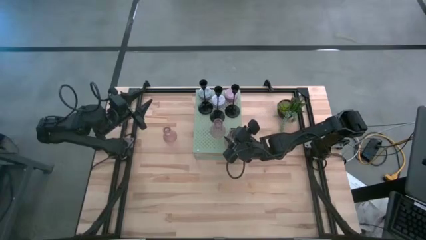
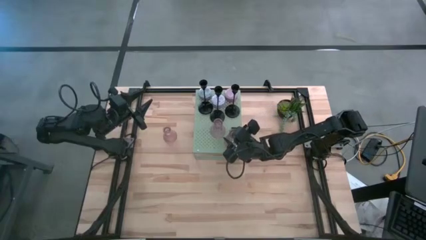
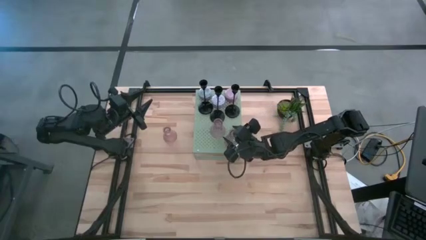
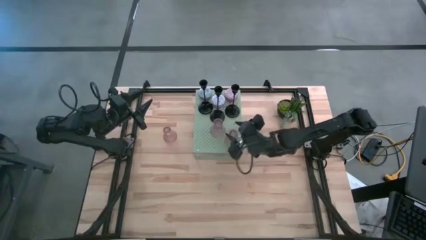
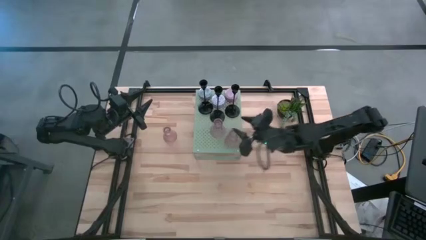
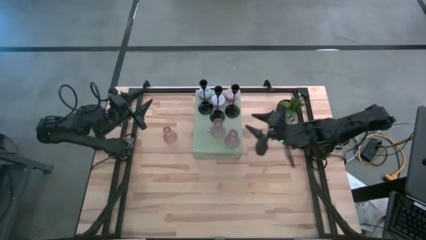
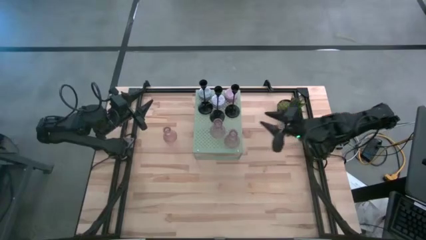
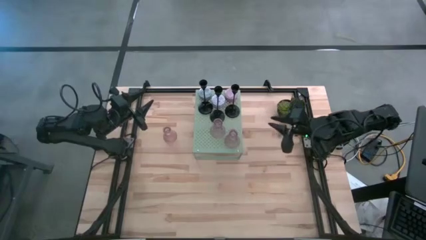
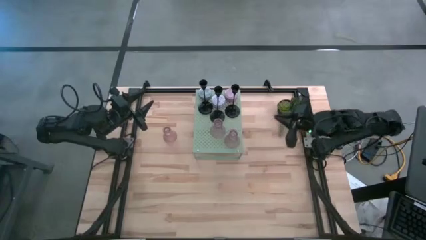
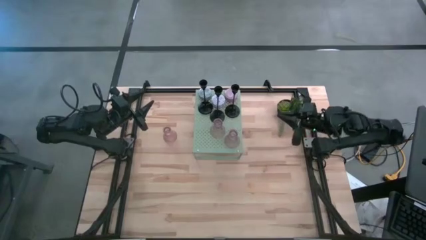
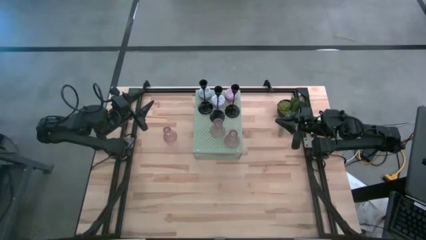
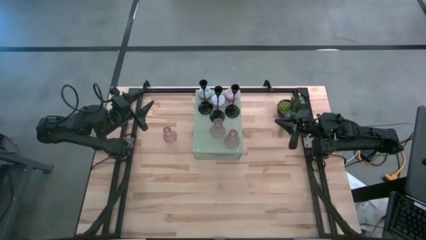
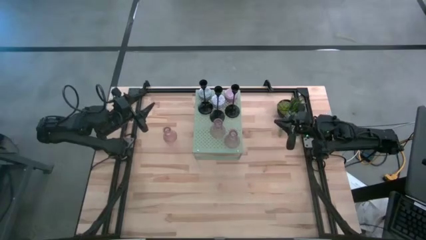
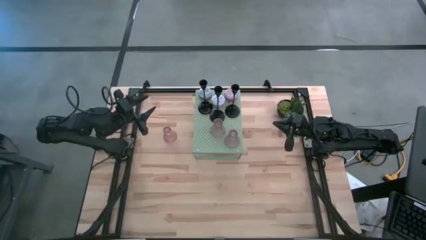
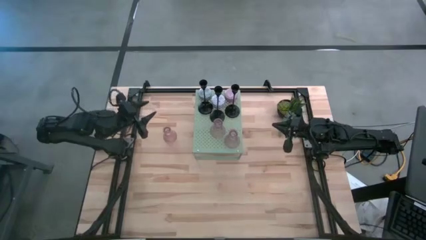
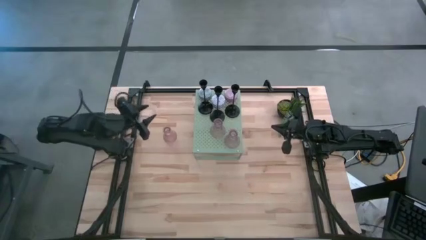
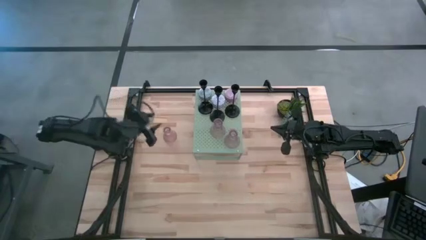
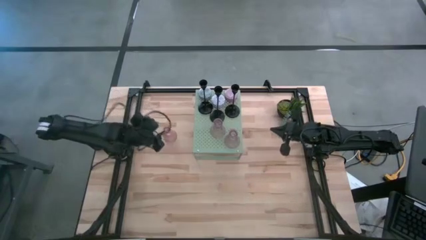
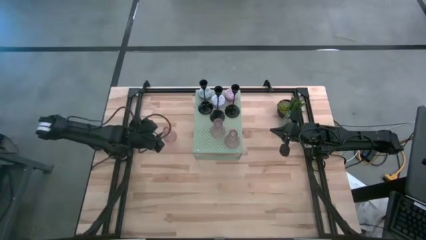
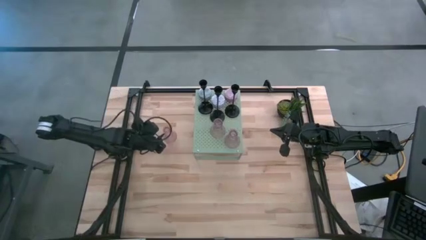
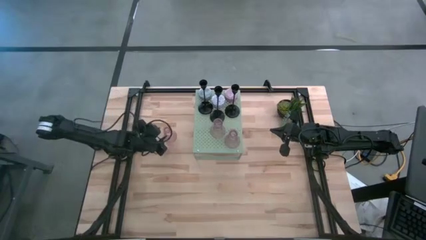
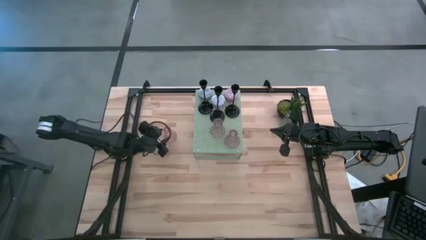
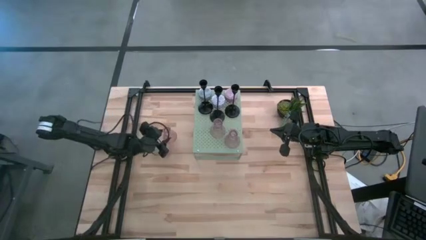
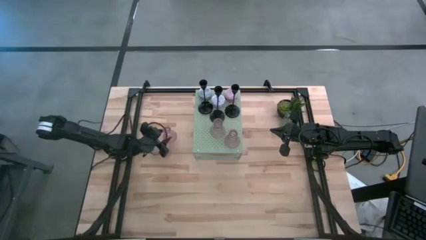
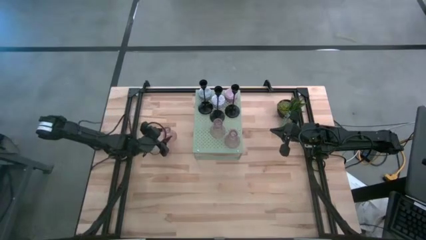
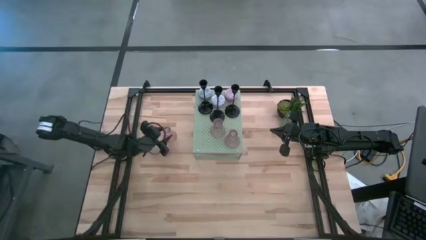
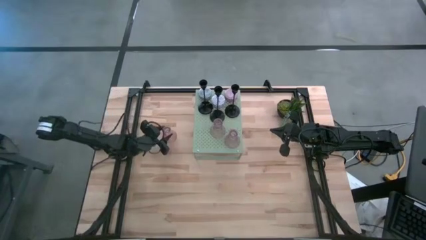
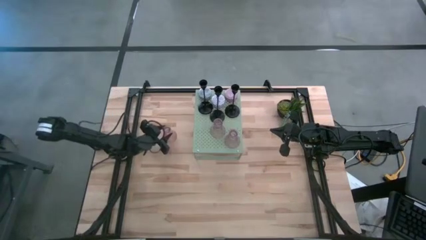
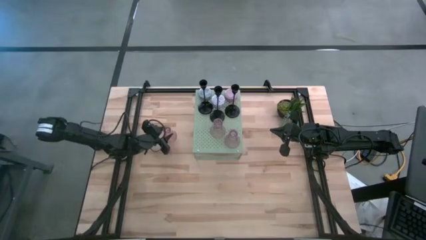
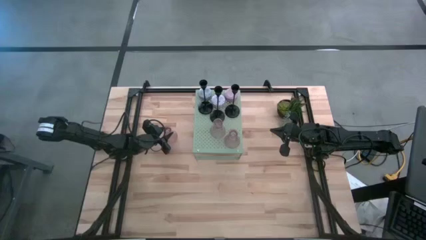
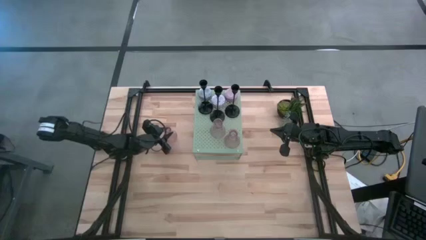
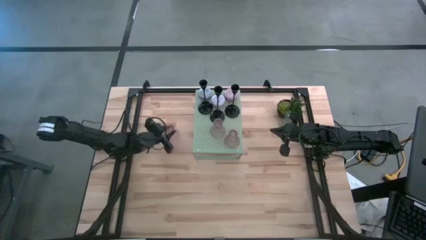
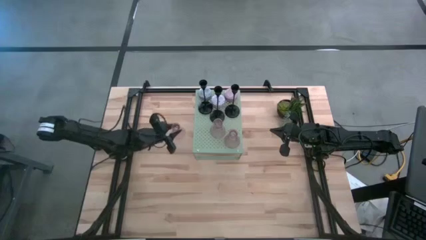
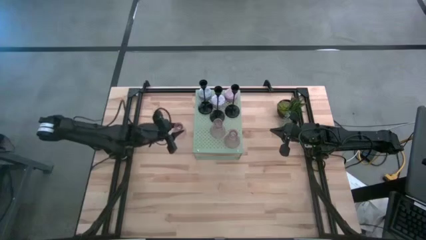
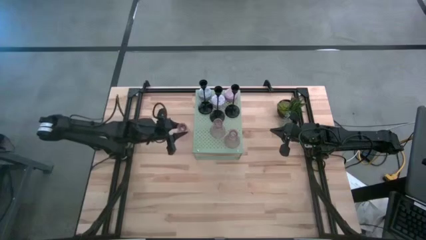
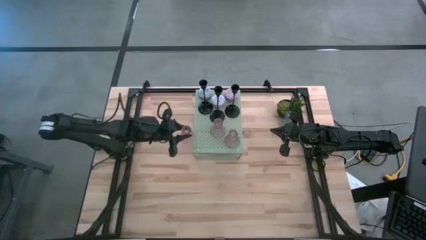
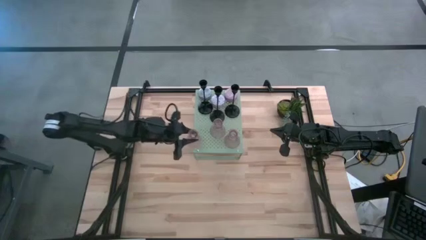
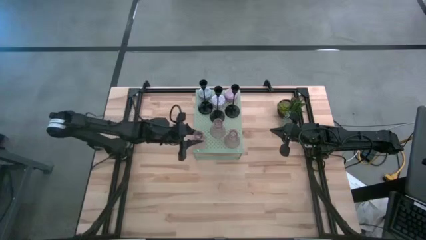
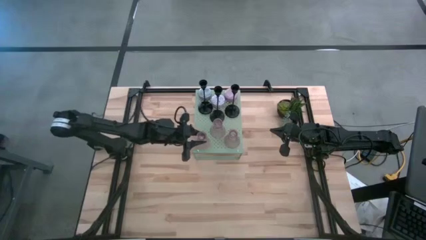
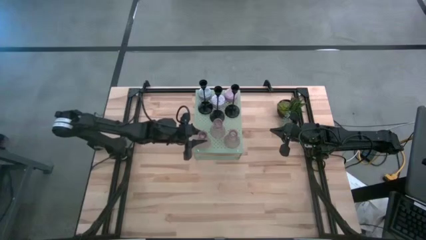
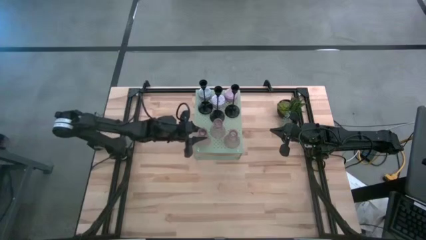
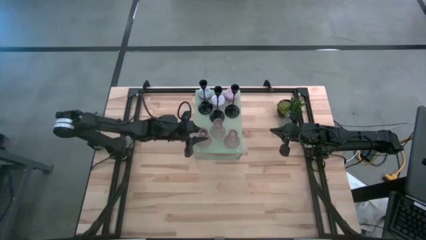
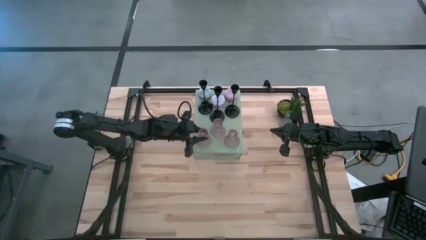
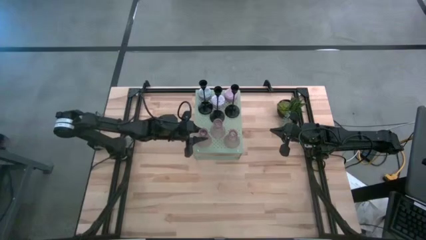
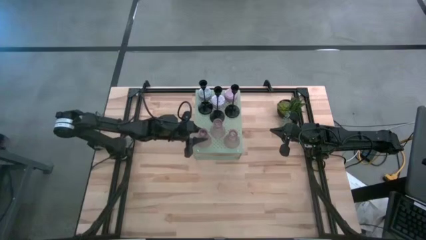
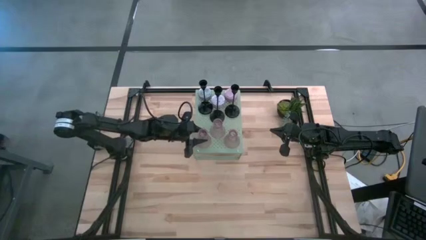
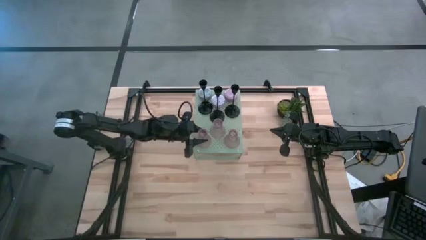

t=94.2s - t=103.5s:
Task: Pick & Place candle stick holders
Put the pink candle holder on the shelf

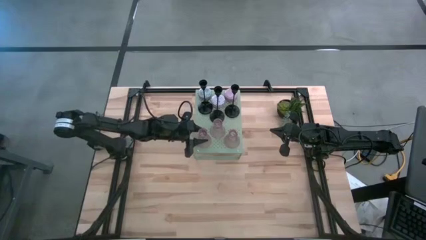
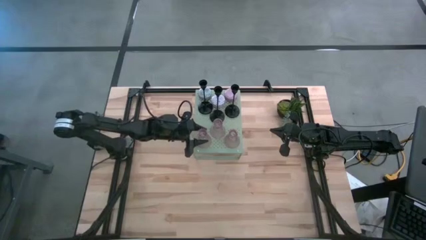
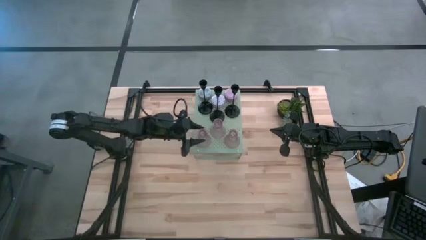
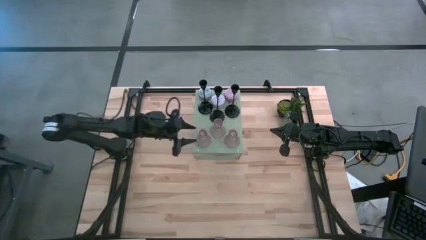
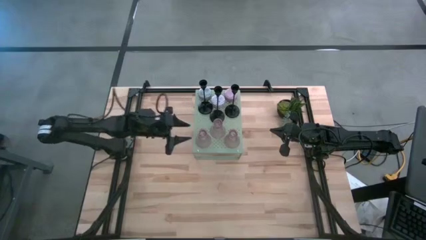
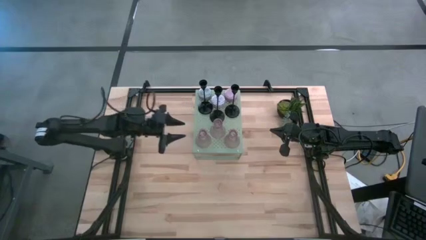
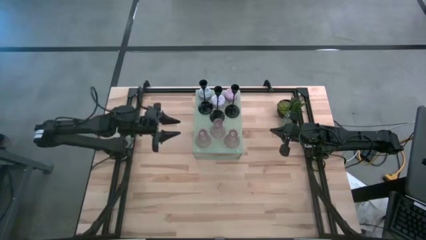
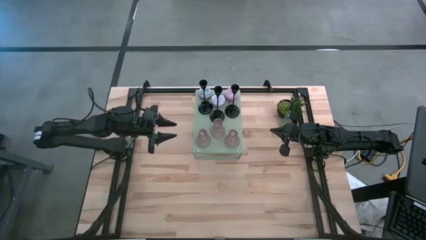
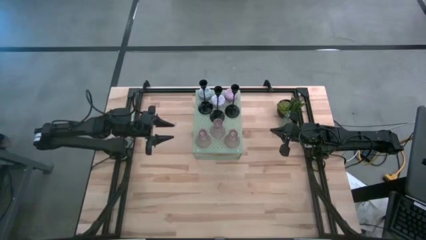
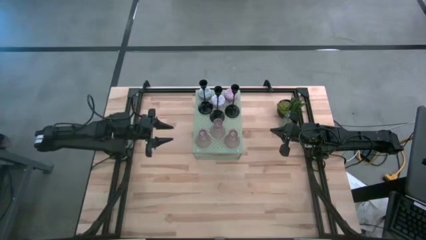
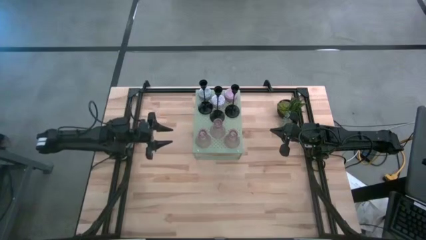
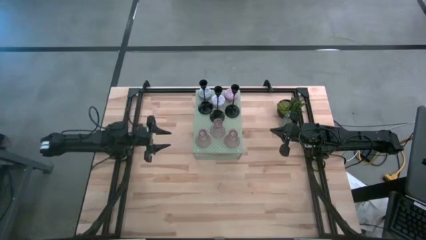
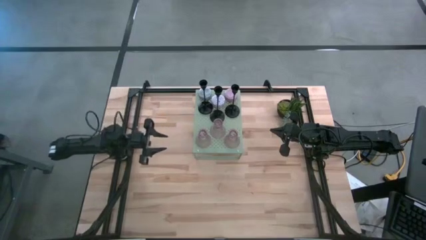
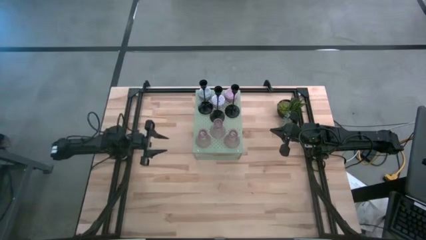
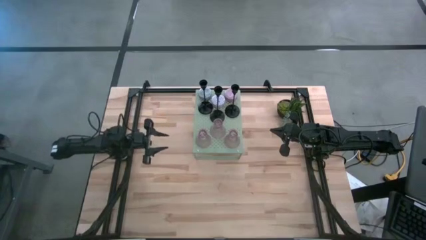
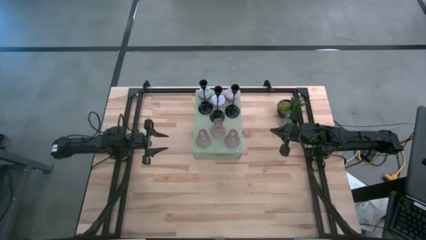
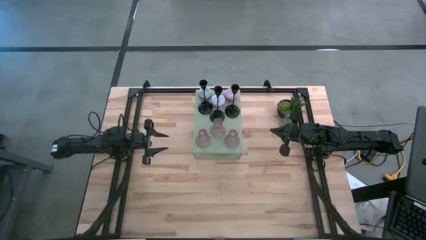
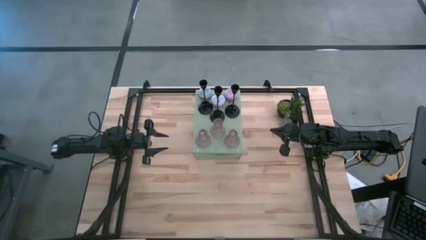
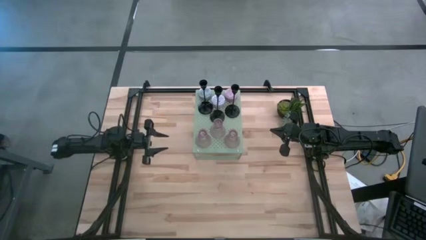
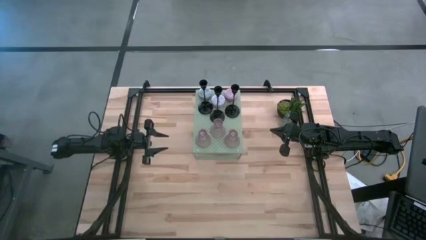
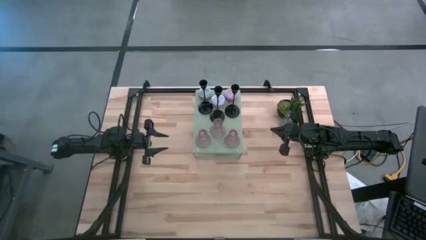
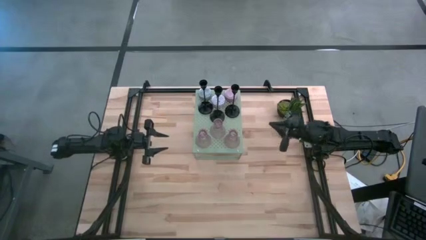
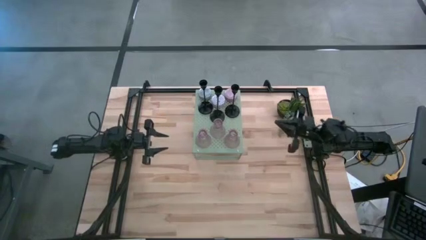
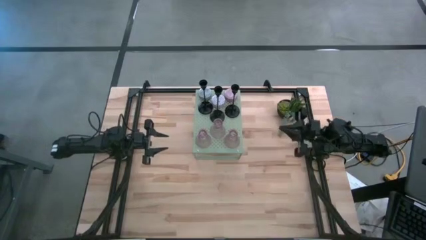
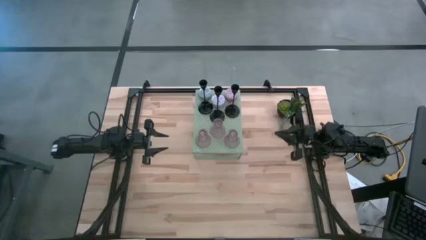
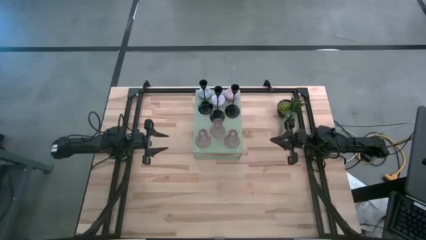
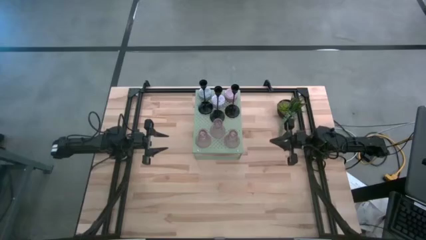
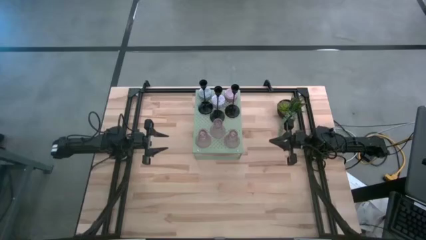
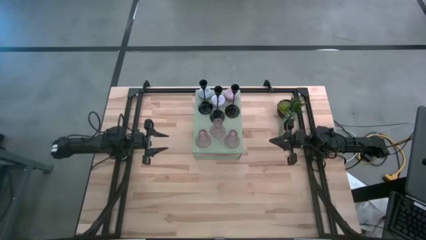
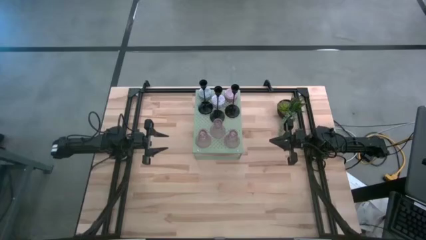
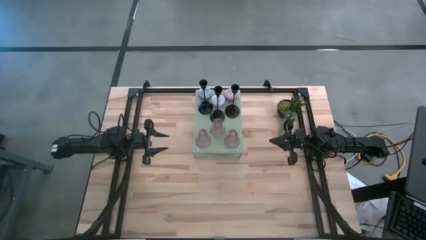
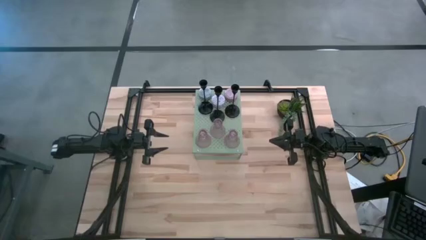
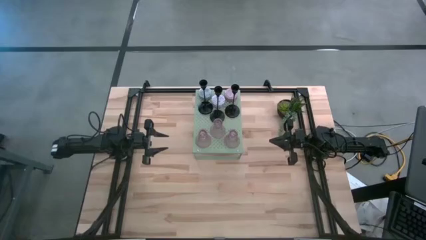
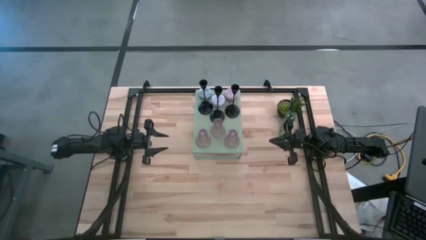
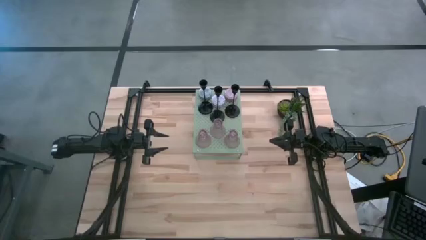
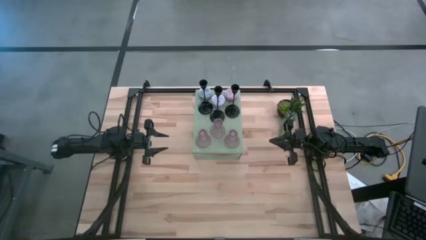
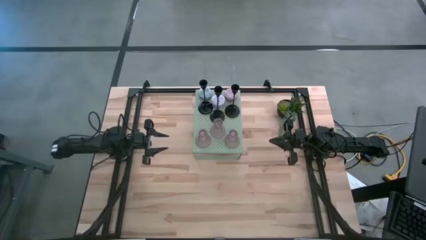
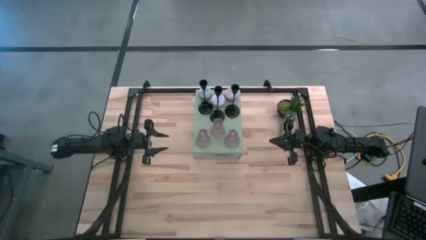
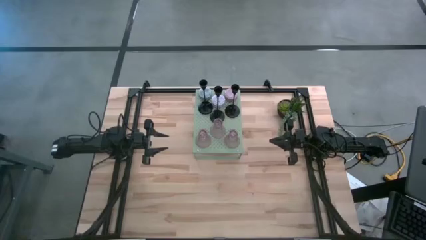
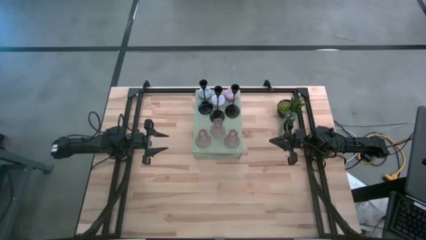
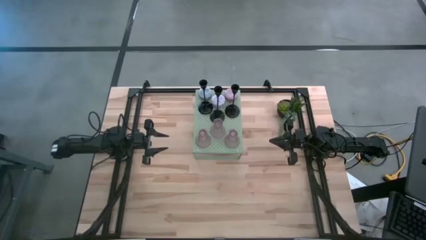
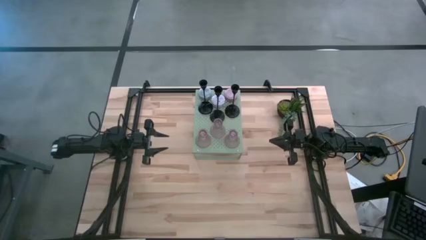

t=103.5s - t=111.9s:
Return to home position
